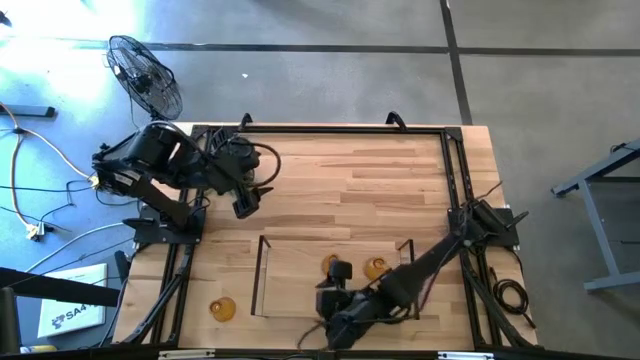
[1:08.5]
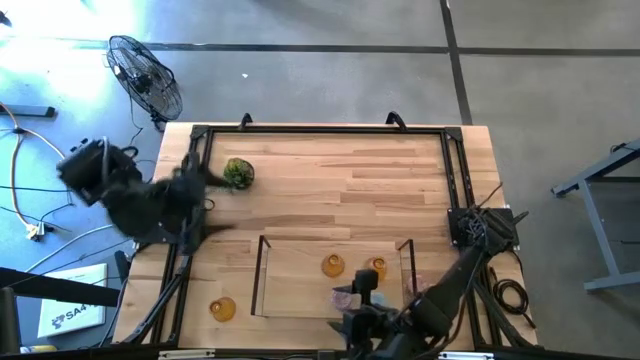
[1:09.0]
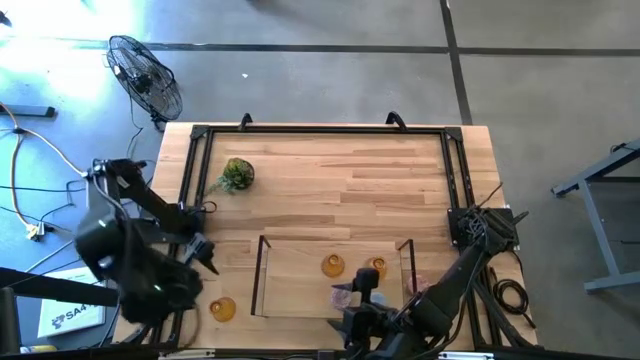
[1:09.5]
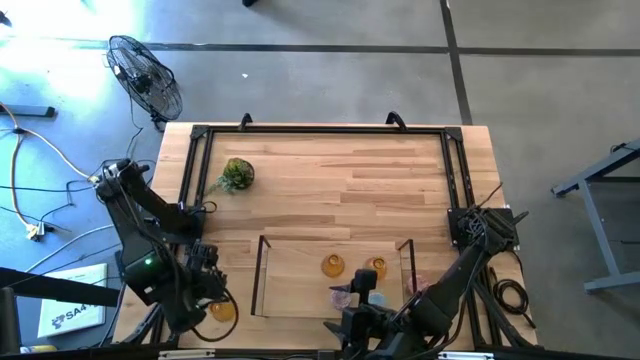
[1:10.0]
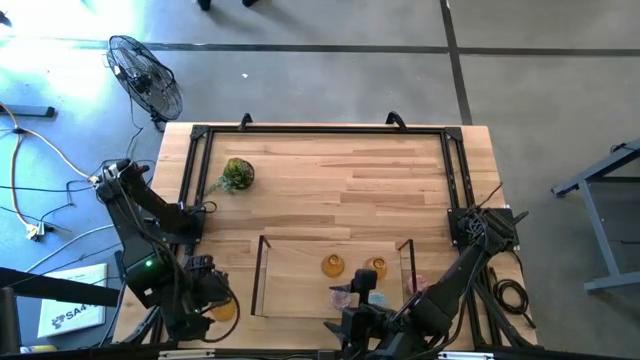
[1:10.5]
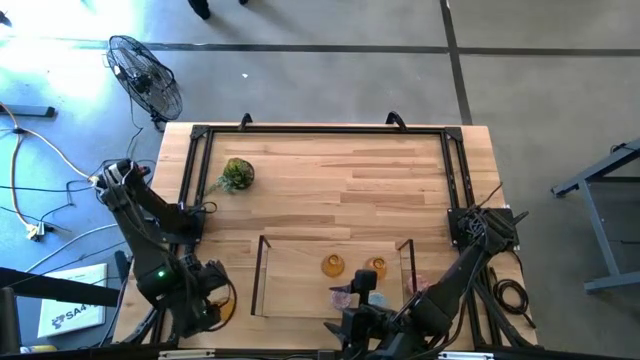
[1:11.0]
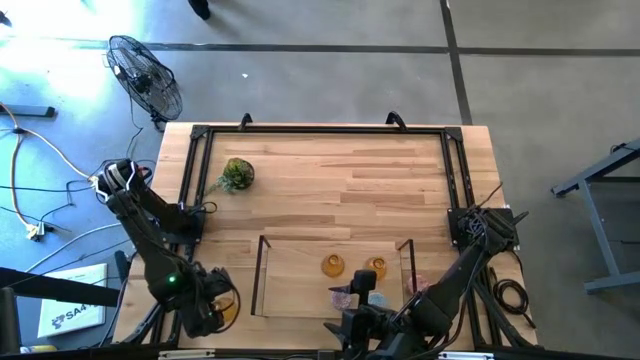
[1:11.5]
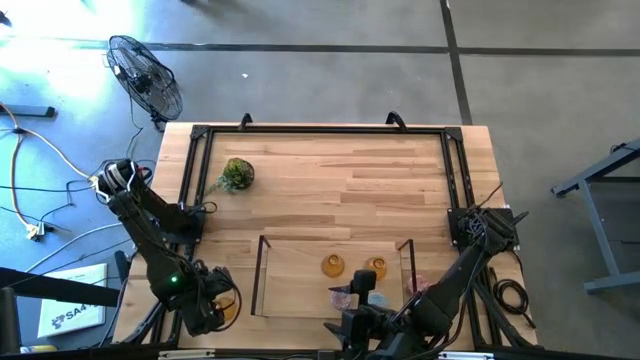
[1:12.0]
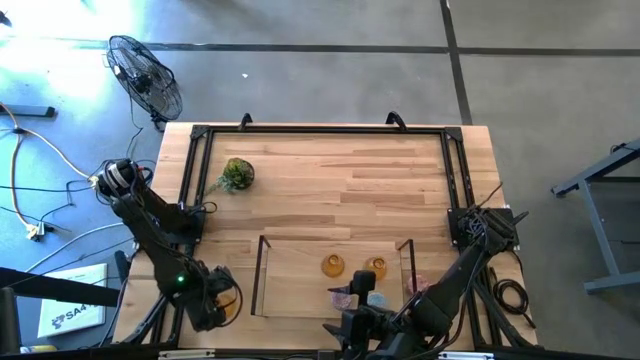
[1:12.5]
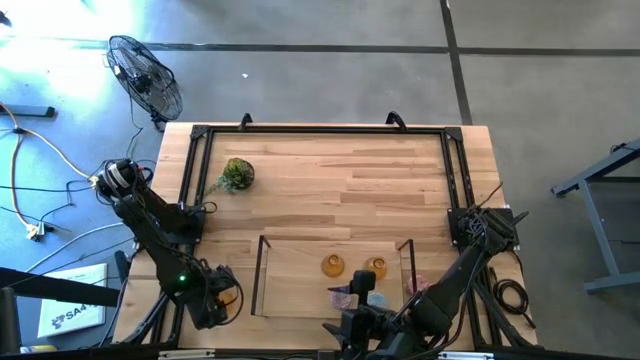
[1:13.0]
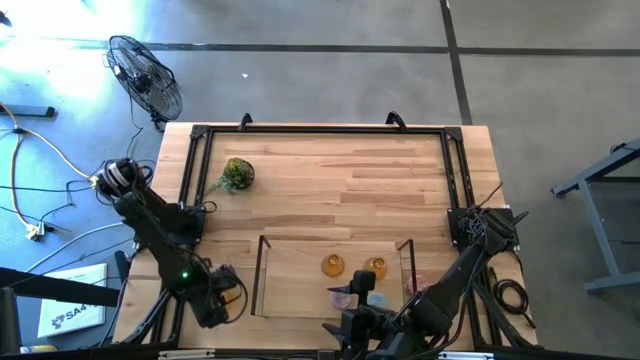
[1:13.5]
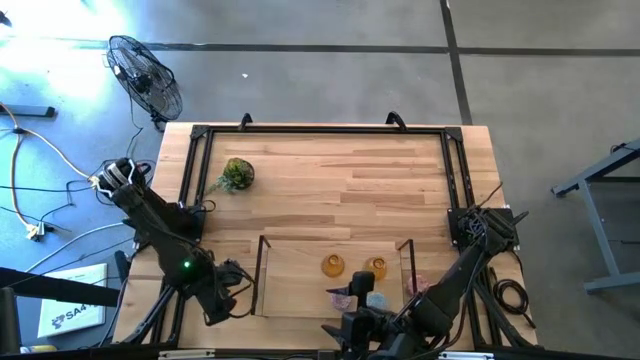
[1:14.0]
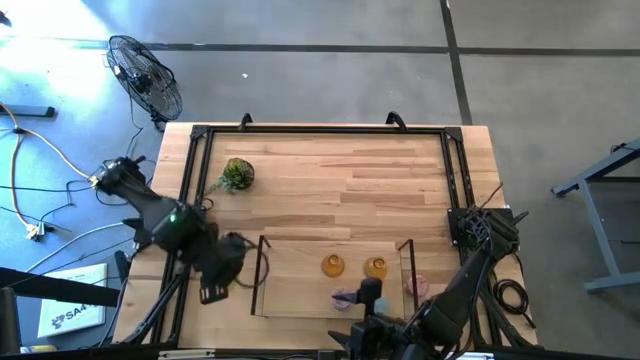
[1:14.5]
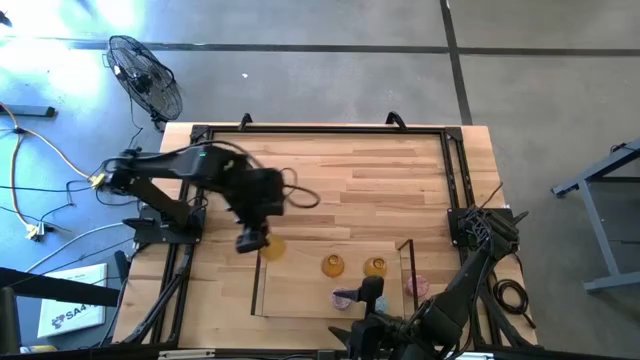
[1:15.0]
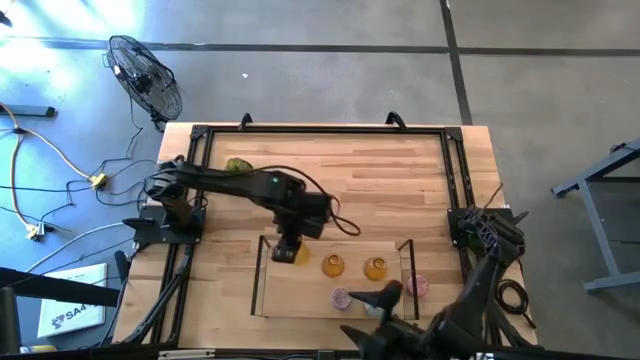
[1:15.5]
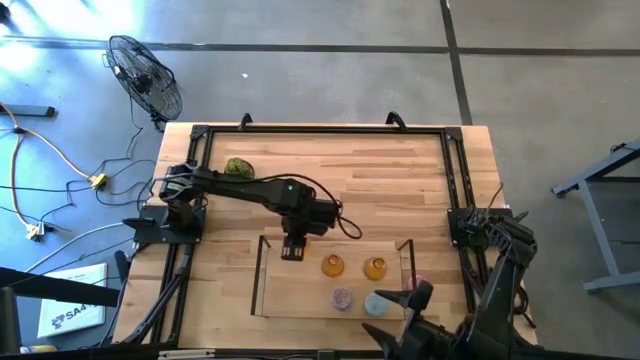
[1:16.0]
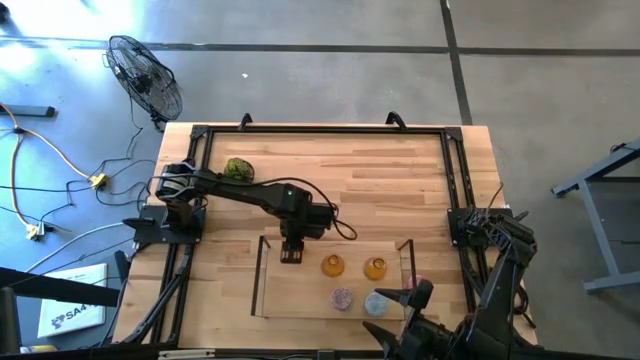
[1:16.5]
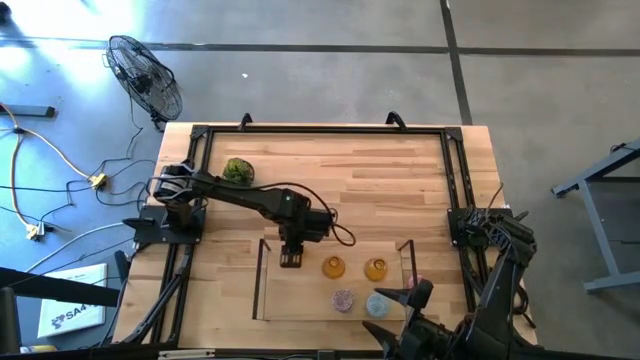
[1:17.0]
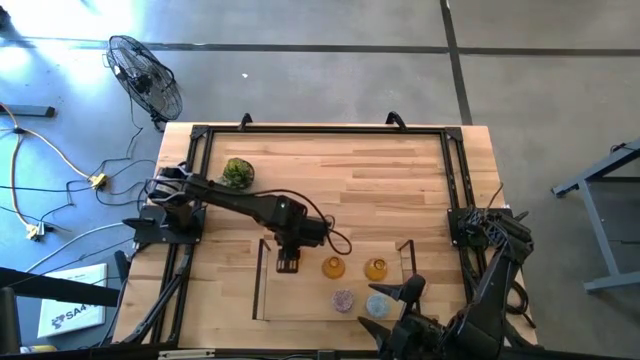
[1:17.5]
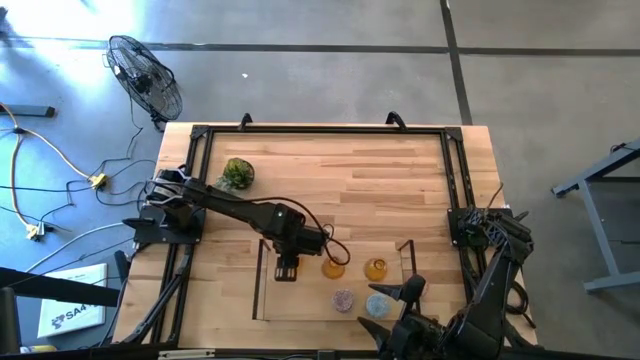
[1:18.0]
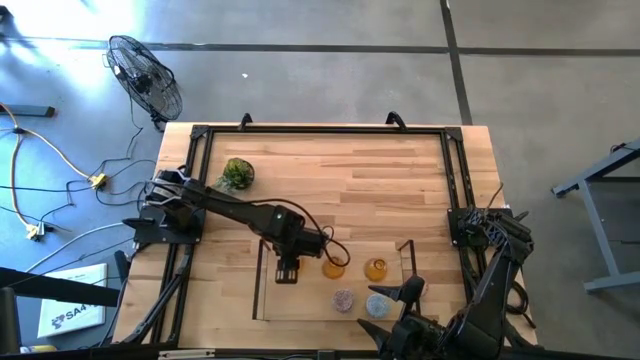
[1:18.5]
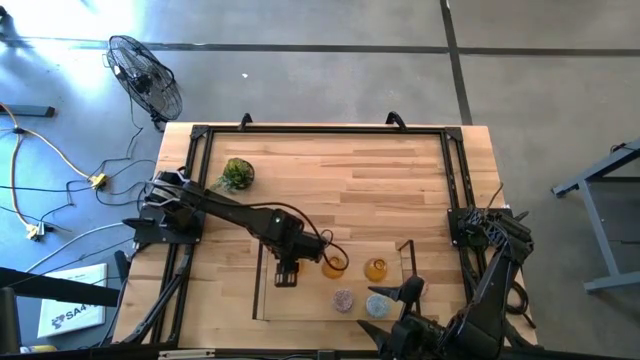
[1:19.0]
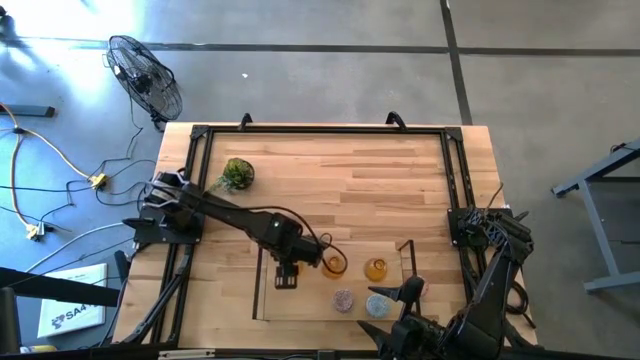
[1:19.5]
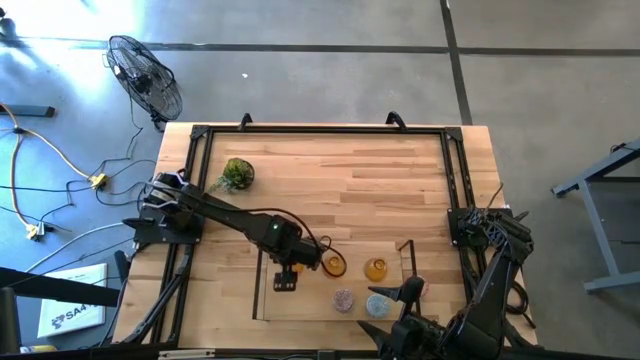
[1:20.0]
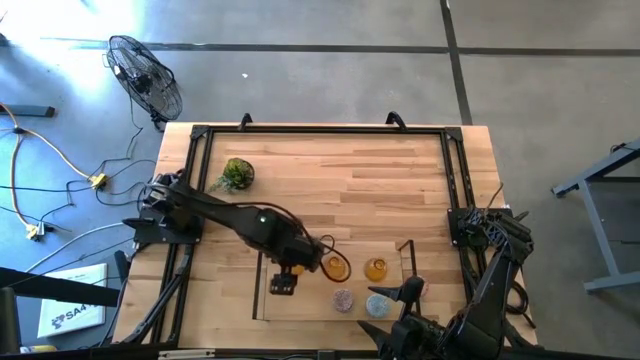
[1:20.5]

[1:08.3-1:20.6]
Task: Pick & Place candle stick holders
Put the brown vase candle holder on the shelf

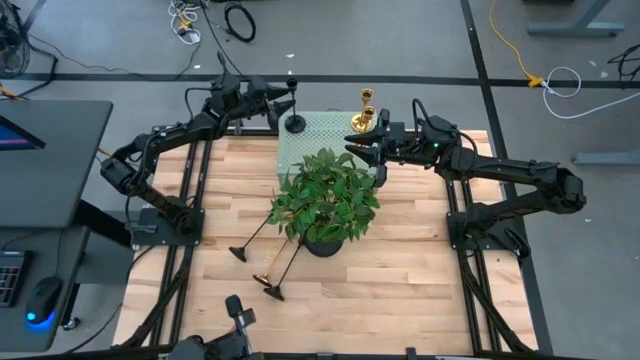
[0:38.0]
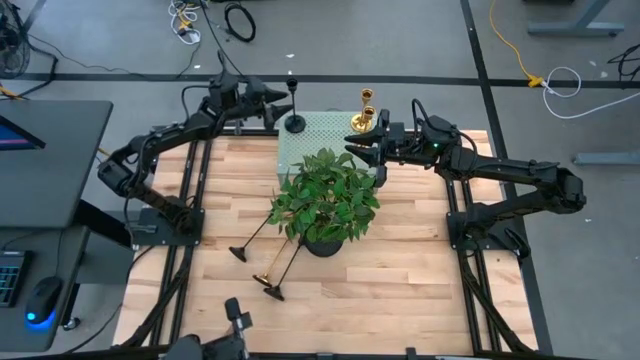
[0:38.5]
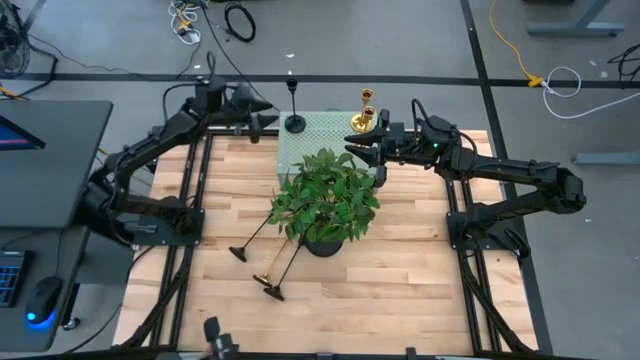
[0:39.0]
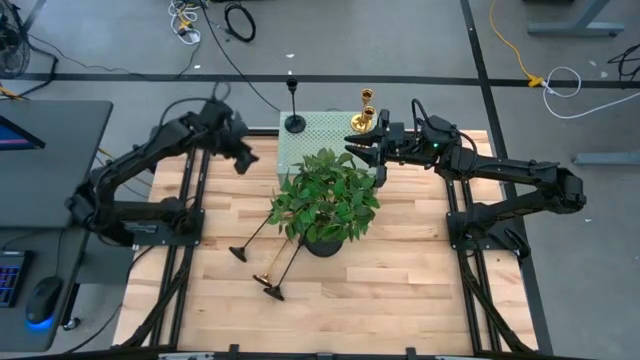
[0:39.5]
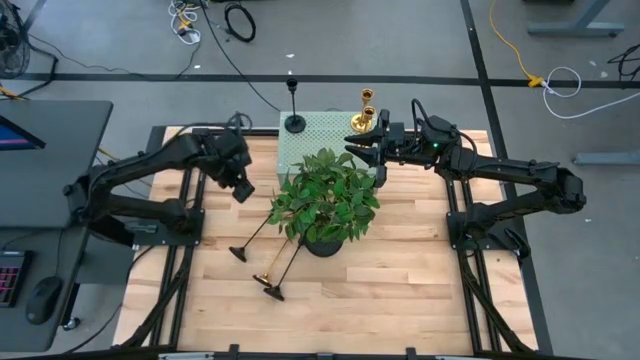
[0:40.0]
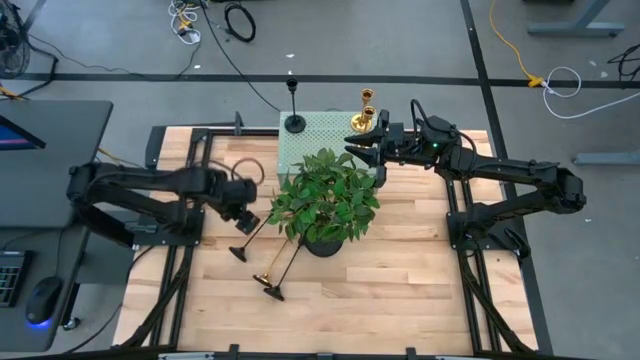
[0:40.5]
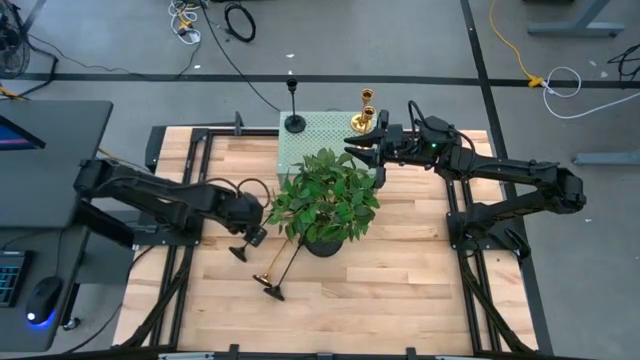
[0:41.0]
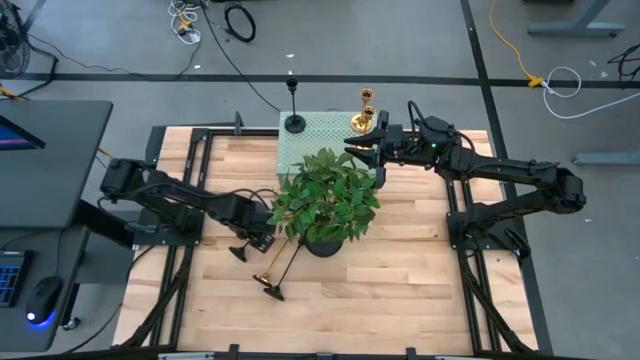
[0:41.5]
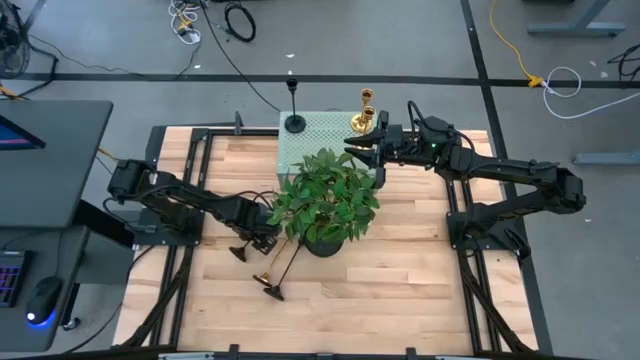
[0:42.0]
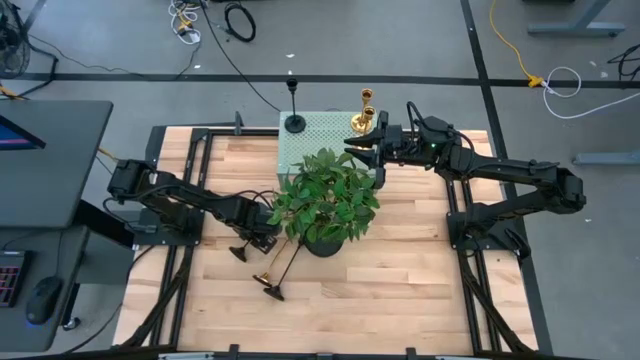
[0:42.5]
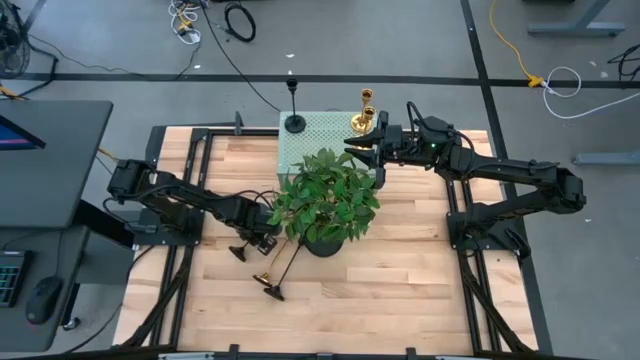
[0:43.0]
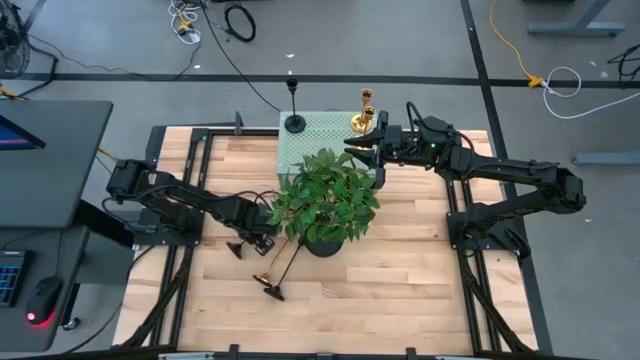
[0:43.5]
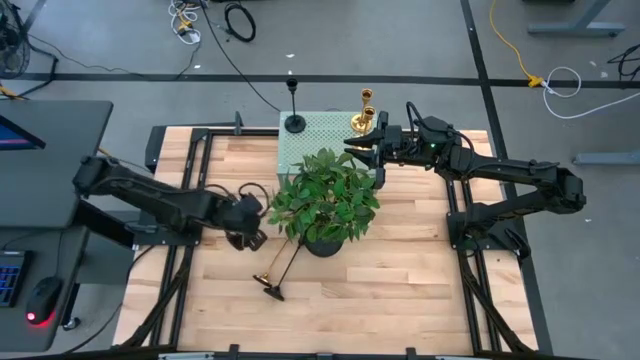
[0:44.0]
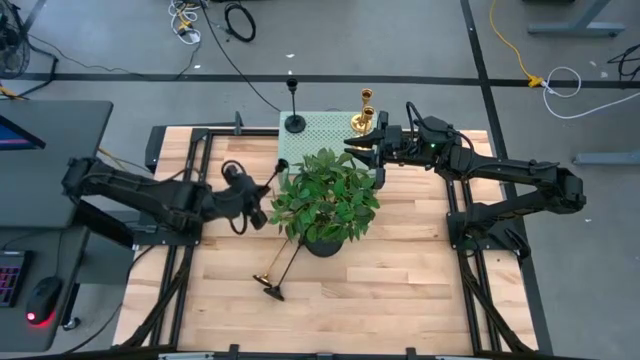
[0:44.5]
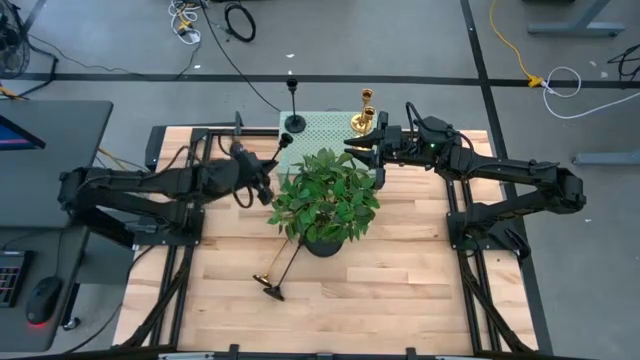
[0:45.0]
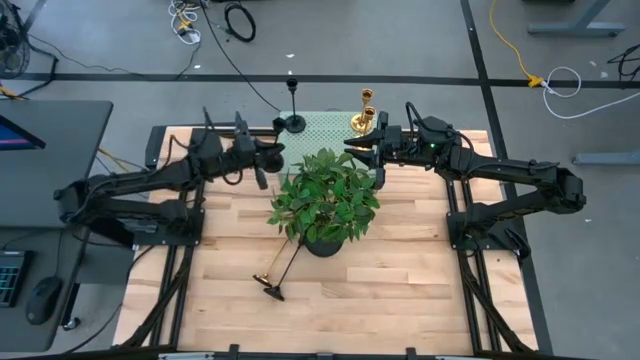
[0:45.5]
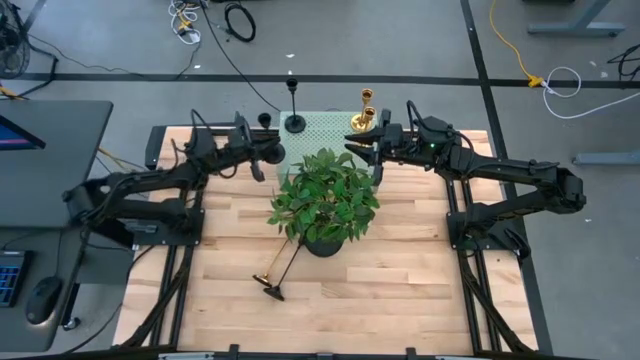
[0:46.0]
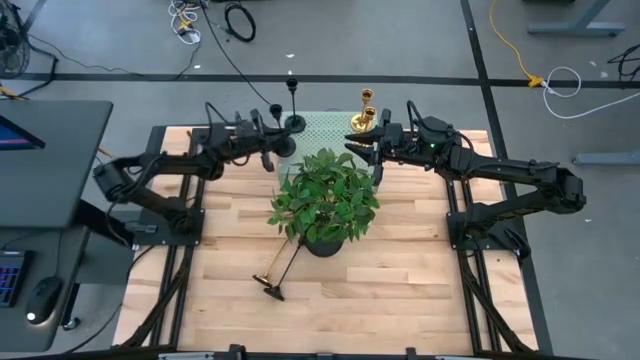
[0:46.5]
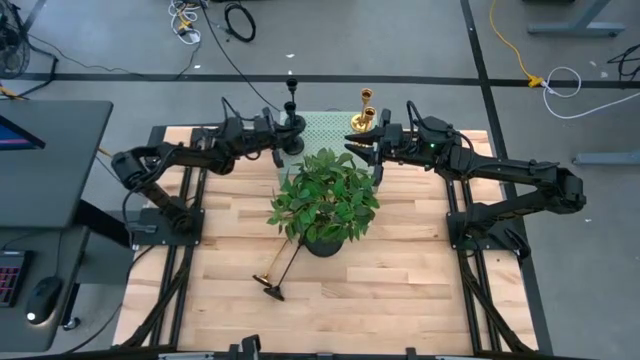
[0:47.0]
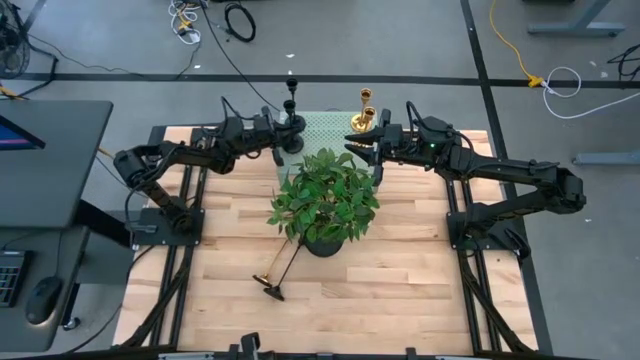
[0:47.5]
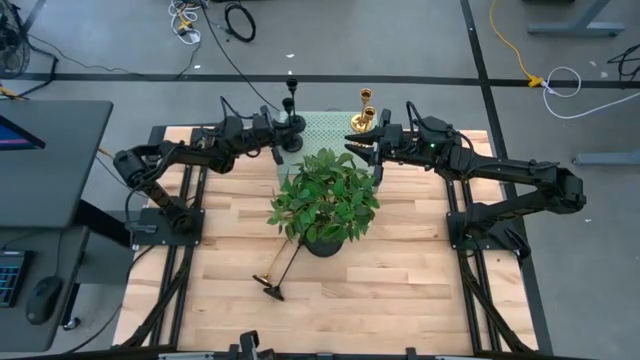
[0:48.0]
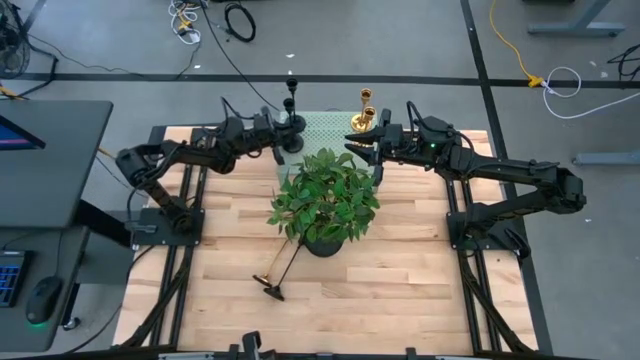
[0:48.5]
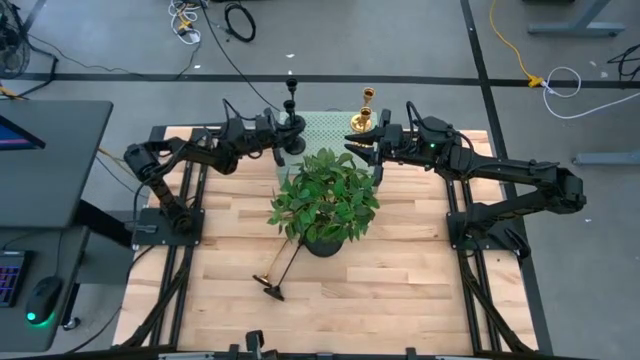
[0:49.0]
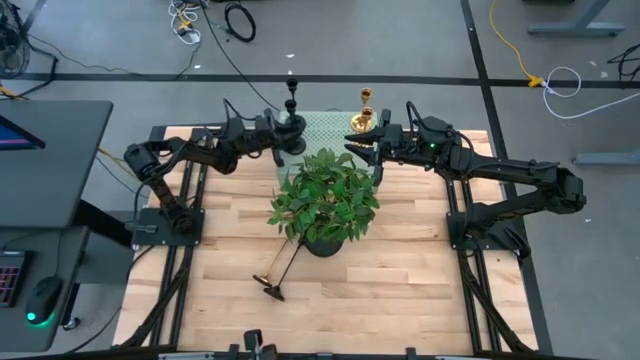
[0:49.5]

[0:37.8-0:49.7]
Task: Pick & Place candle stick holders
Put the top black candle holder on the shelf aligned with the other black candle holder
